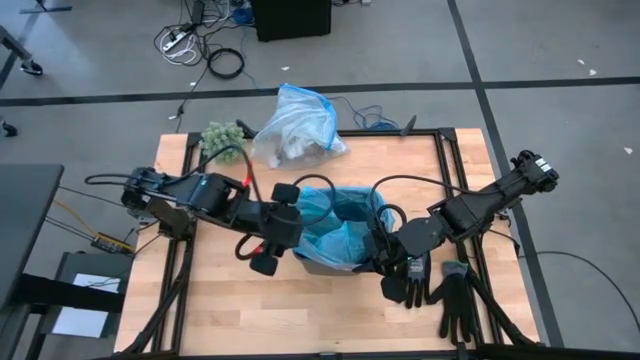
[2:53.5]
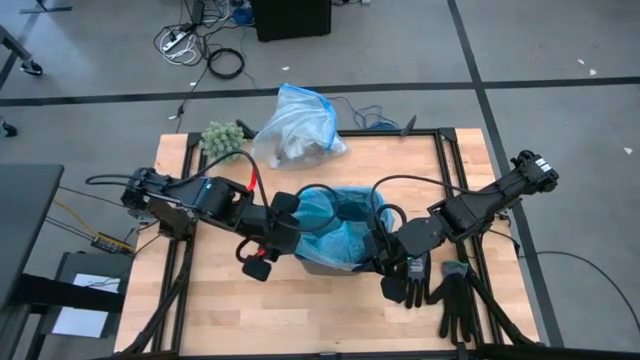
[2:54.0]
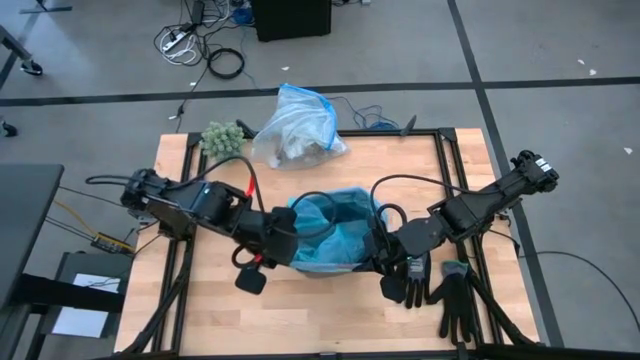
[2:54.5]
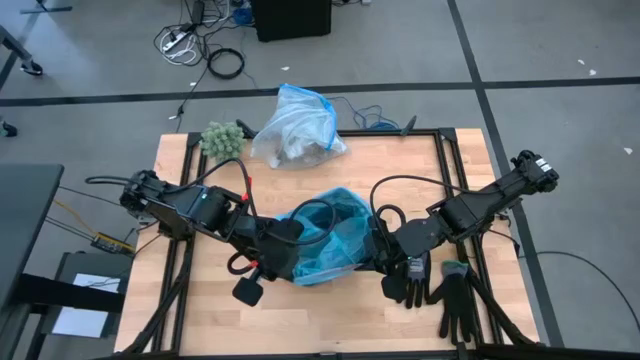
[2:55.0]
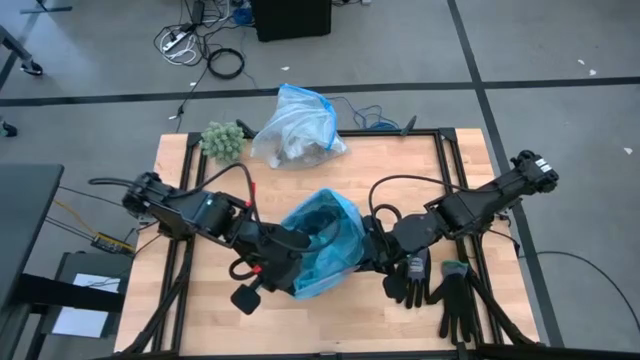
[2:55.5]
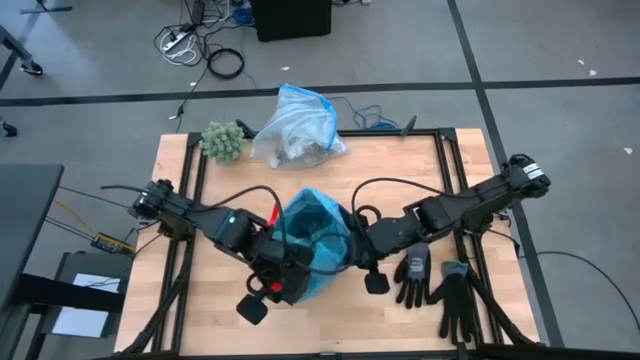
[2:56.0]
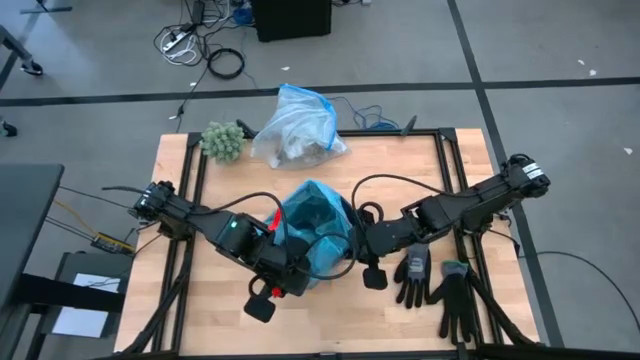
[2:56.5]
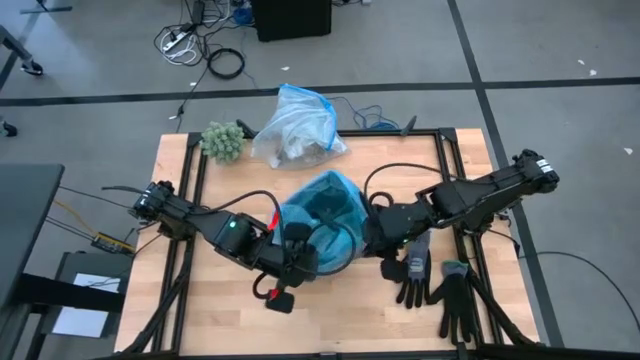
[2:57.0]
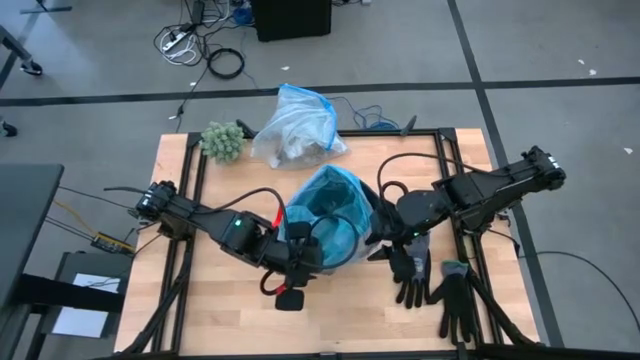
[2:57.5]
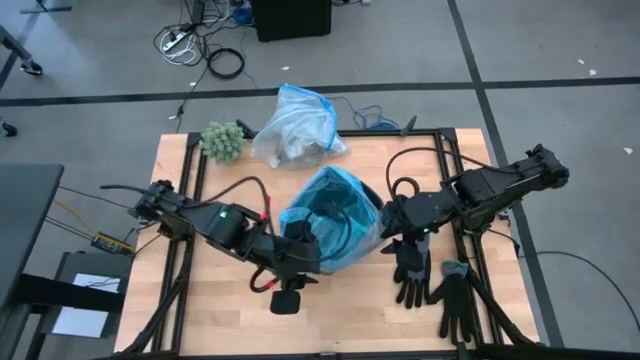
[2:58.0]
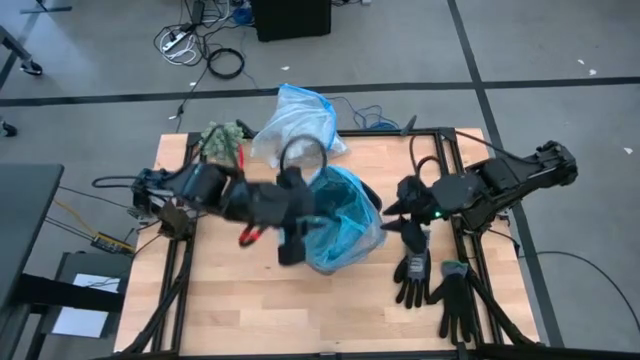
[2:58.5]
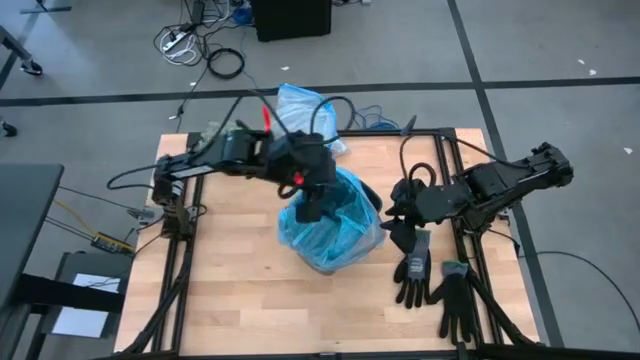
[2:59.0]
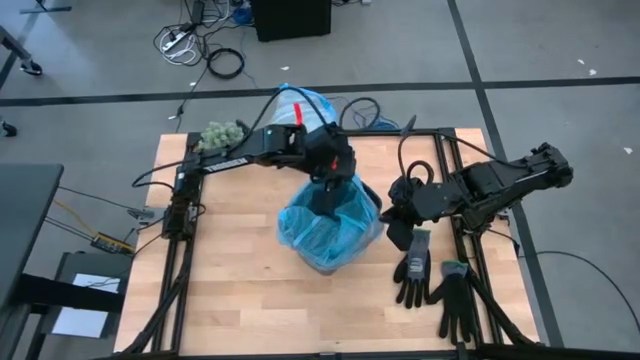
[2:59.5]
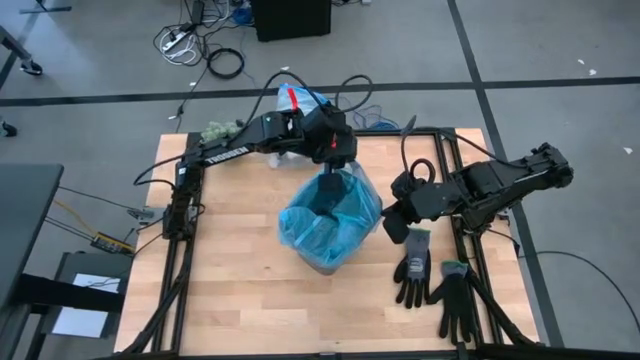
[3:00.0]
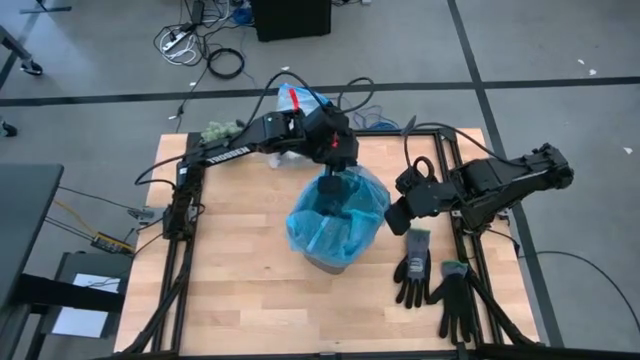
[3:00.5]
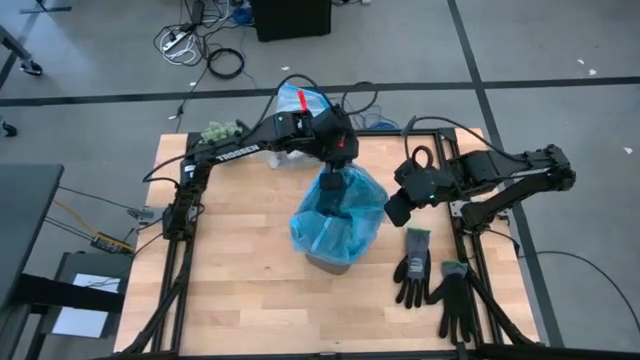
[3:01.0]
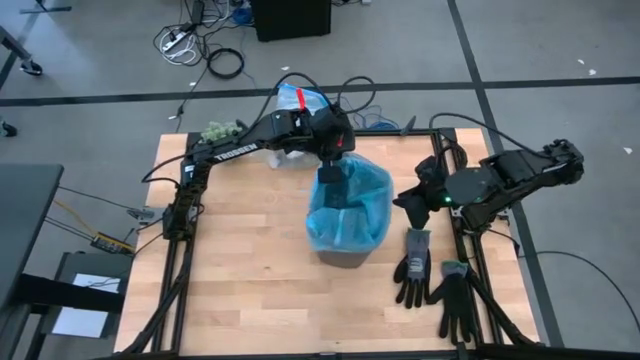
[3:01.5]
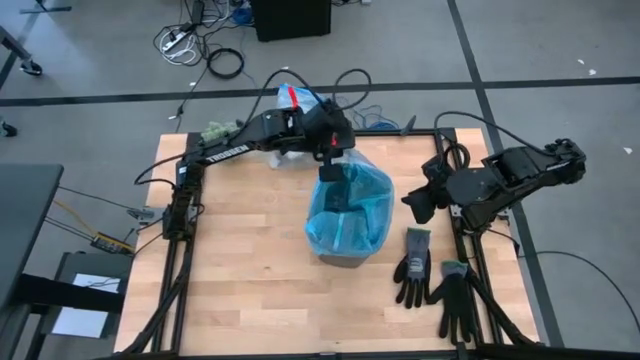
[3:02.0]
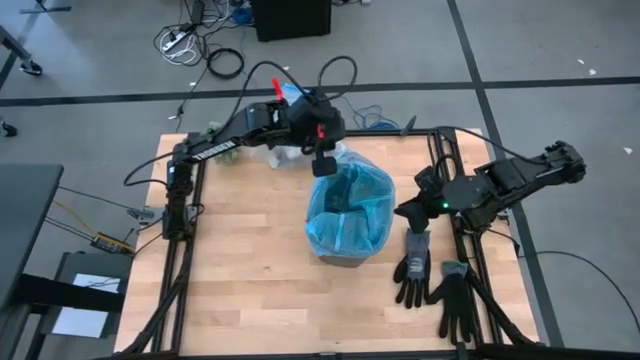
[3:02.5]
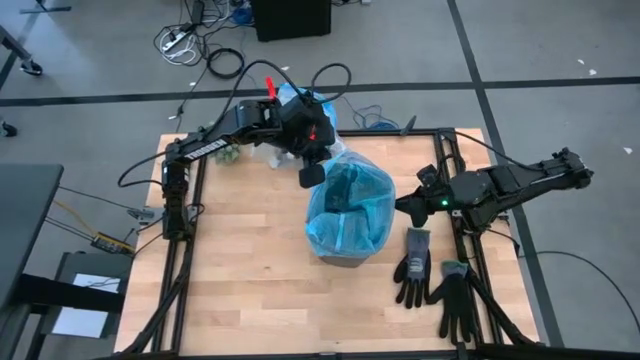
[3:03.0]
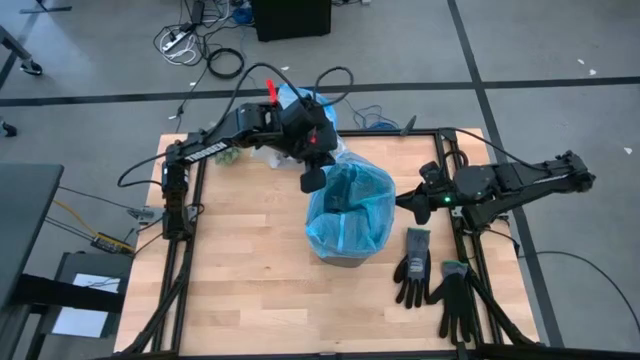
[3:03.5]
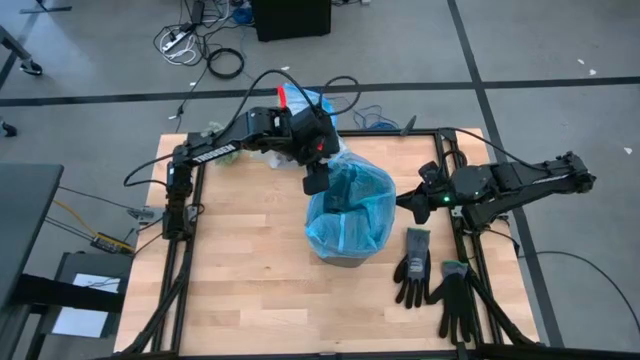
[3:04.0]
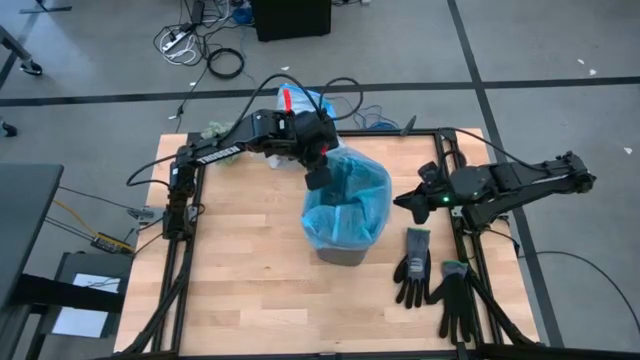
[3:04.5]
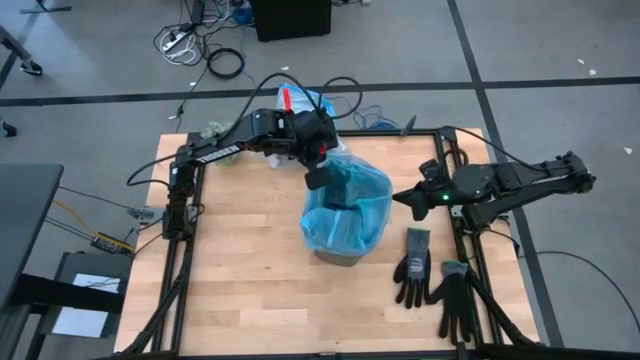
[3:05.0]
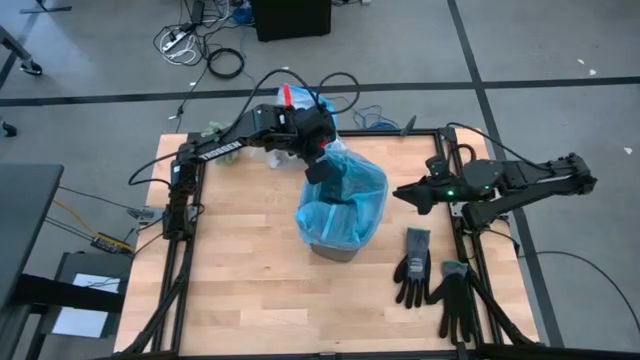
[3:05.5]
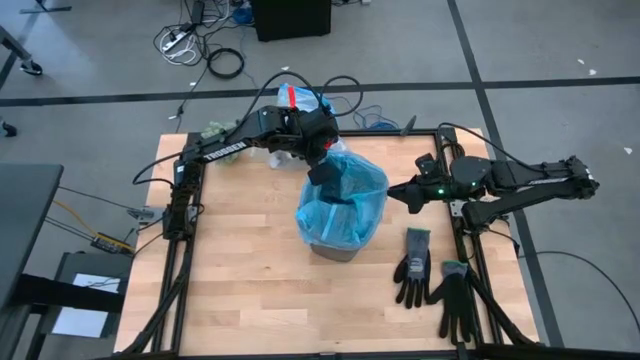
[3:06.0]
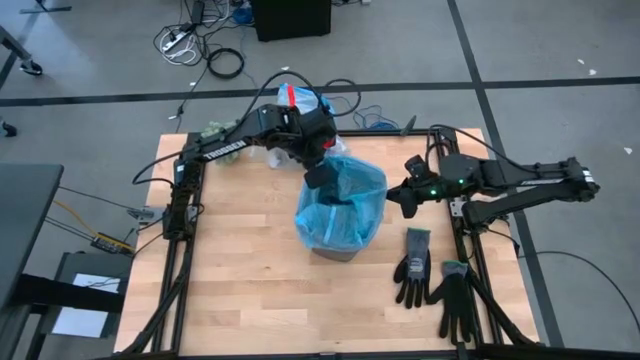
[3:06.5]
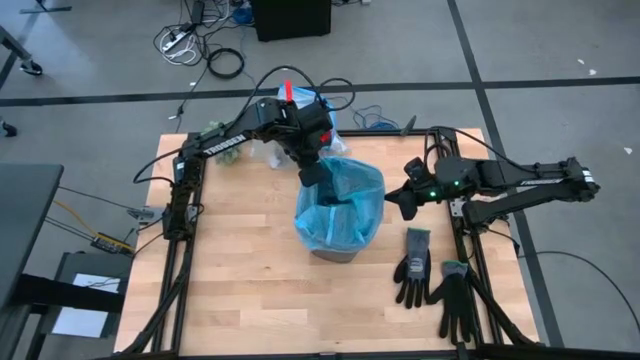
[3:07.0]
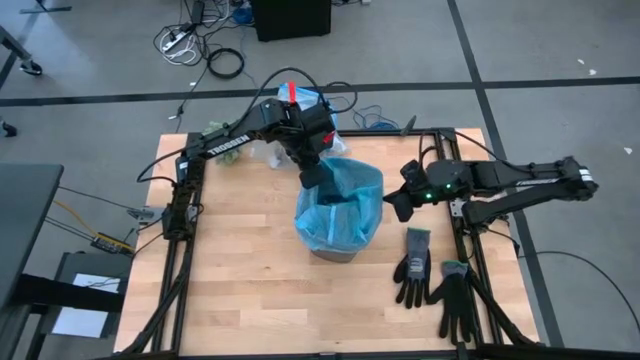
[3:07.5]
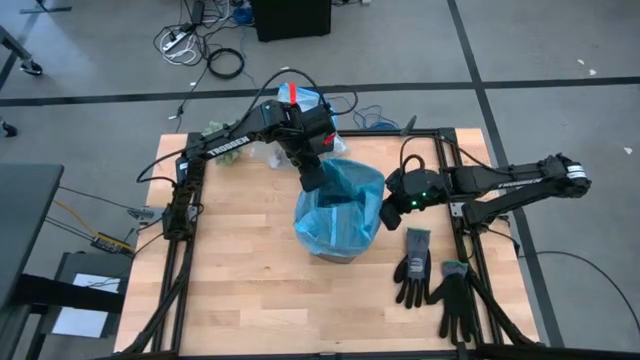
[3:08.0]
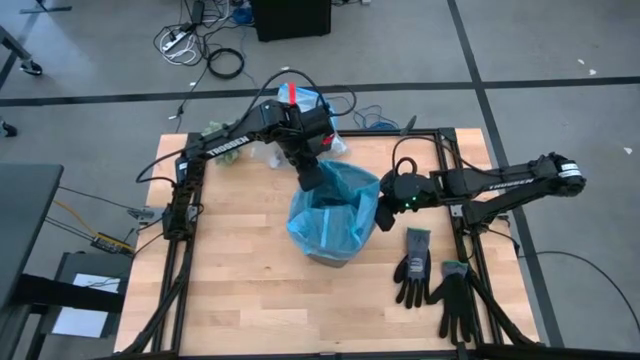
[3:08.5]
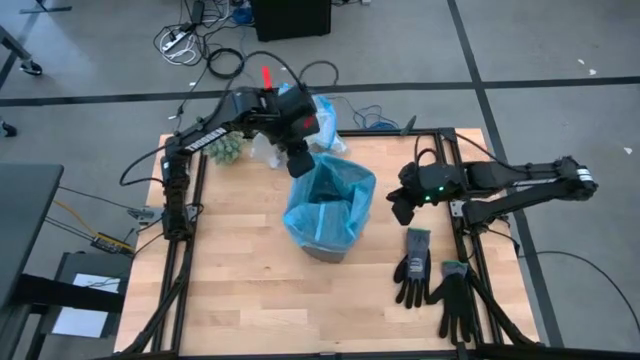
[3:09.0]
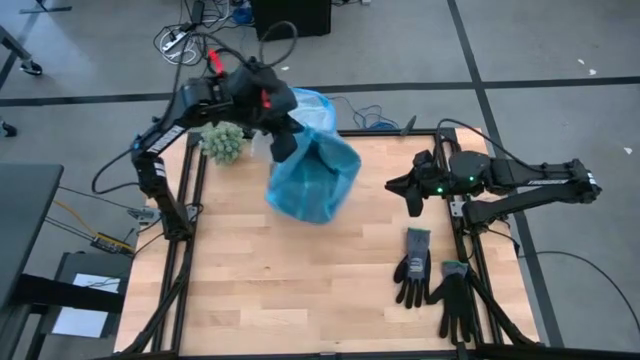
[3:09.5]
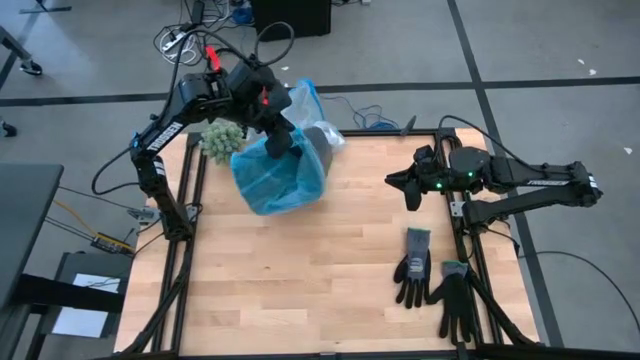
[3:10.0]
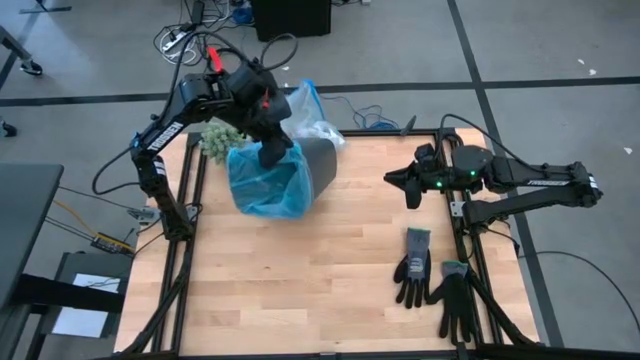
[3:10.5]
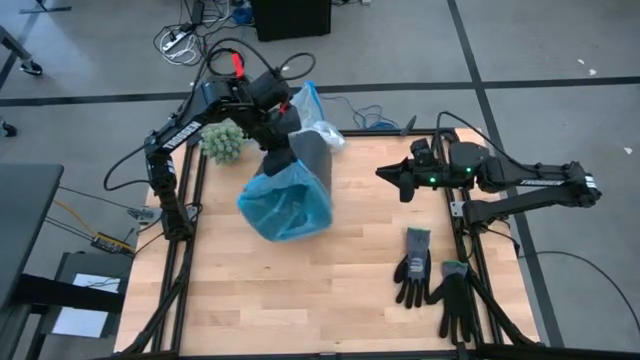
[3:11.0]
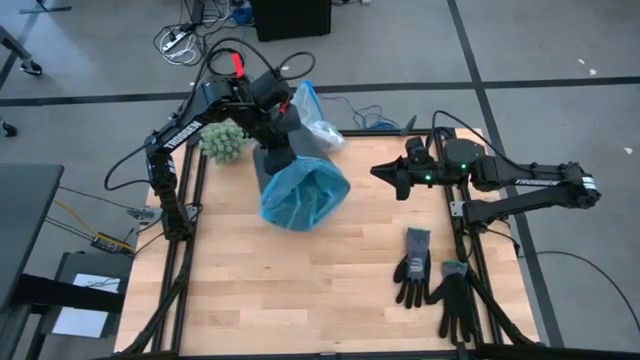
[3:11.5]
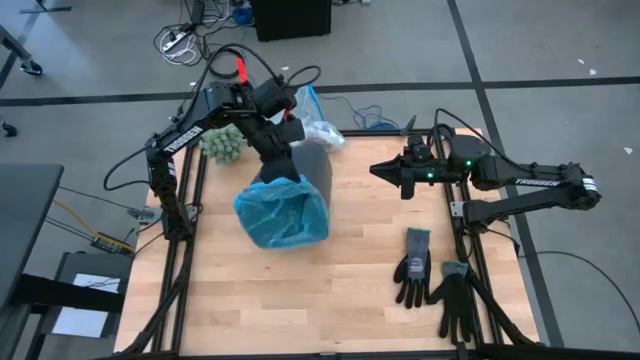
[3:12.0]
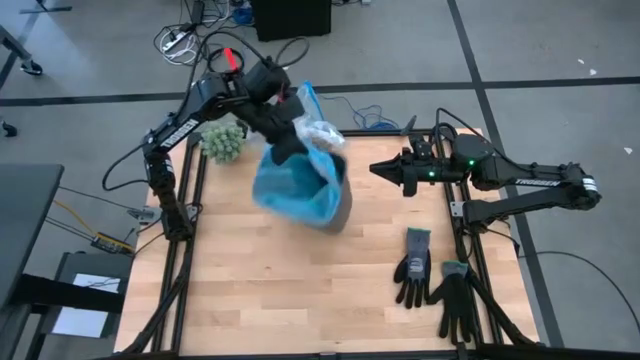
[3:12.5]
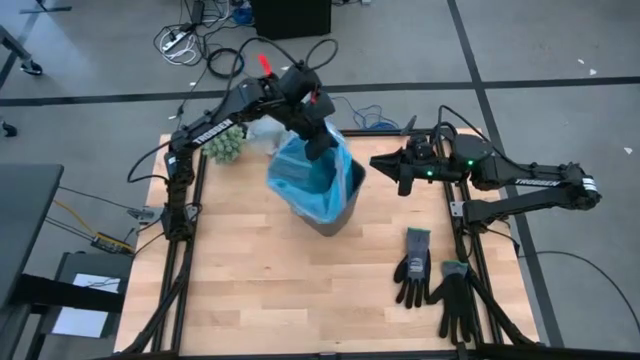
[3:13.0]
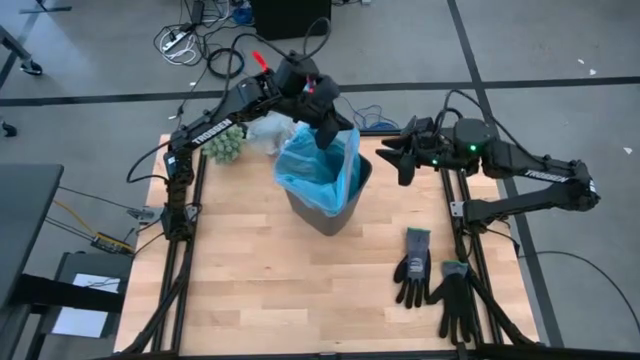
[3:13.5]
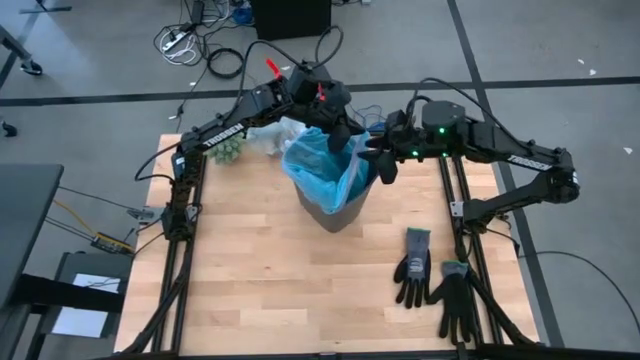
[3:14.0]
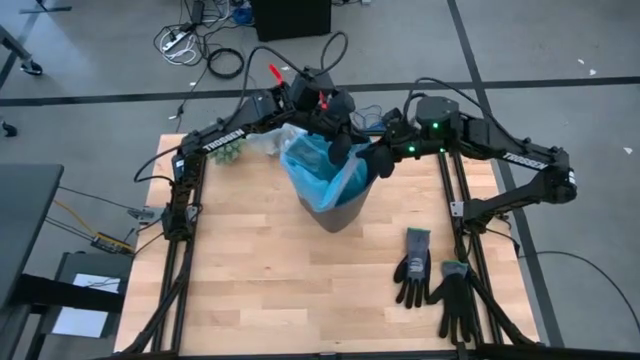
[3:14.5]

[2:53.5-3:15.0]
Task: place trash/remove bag and relplace
Insert the new blue trash bag into the trash bin
